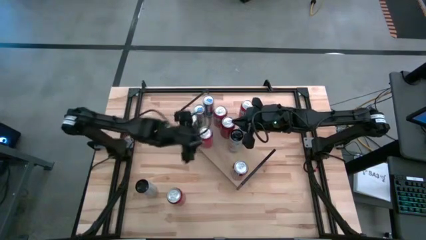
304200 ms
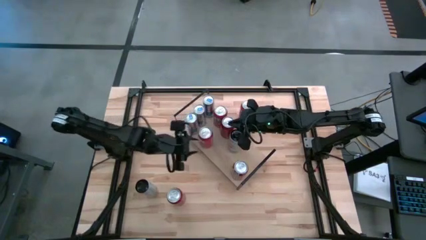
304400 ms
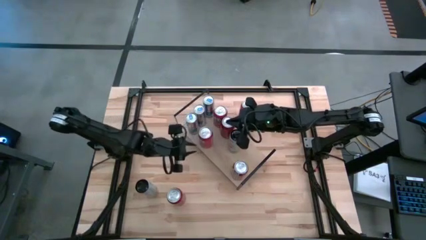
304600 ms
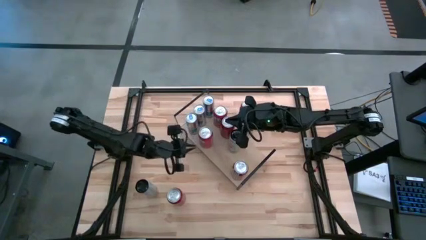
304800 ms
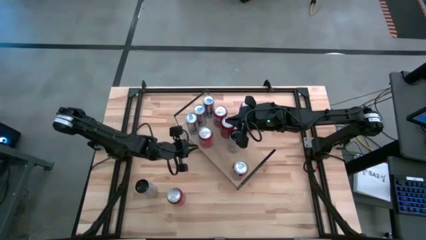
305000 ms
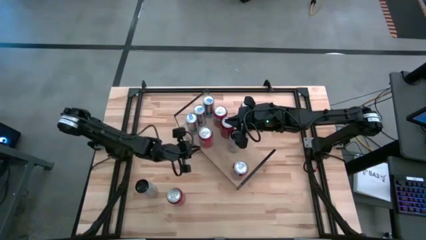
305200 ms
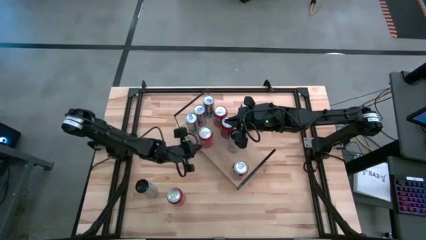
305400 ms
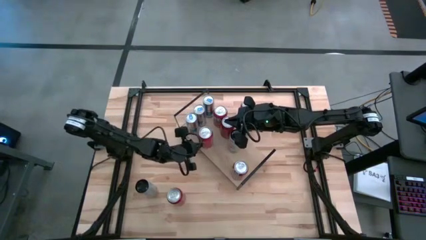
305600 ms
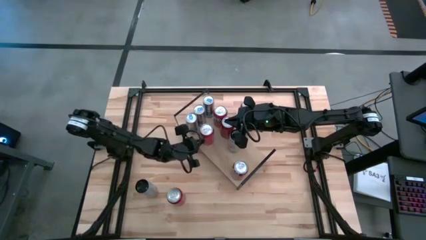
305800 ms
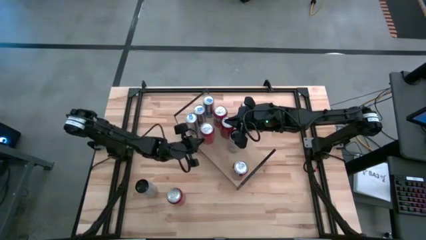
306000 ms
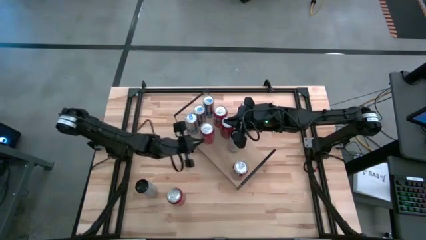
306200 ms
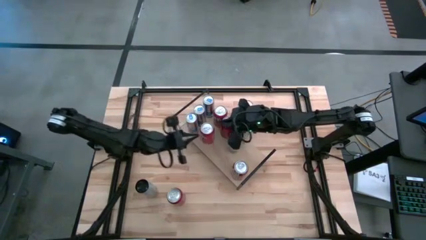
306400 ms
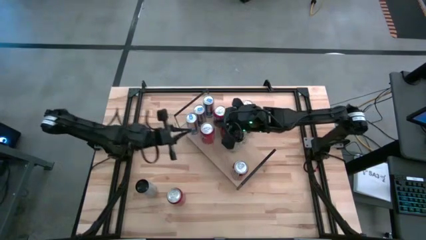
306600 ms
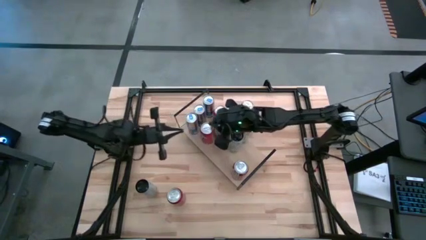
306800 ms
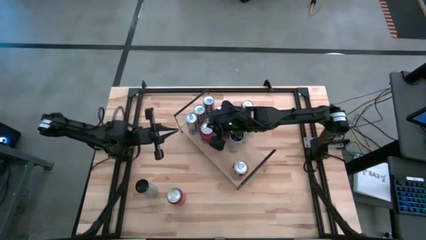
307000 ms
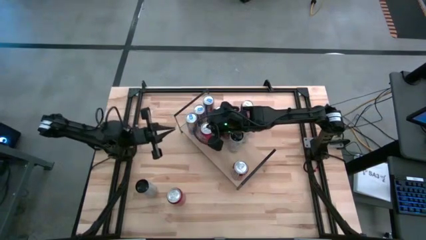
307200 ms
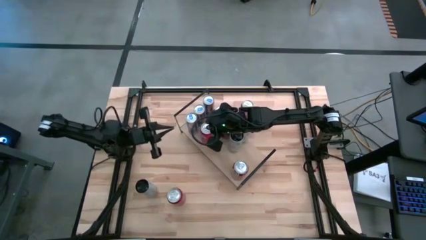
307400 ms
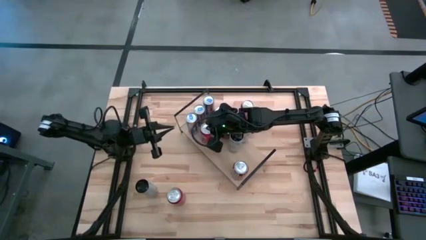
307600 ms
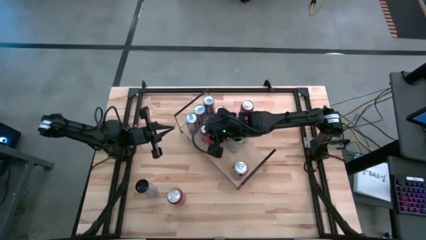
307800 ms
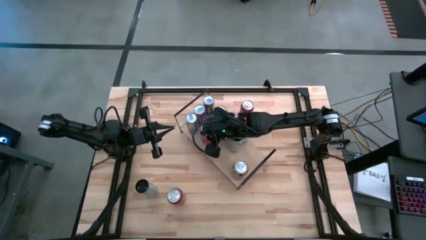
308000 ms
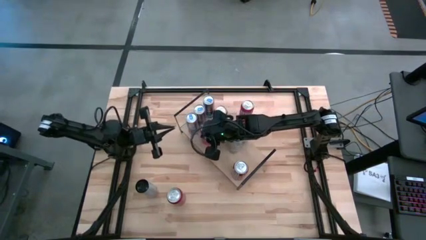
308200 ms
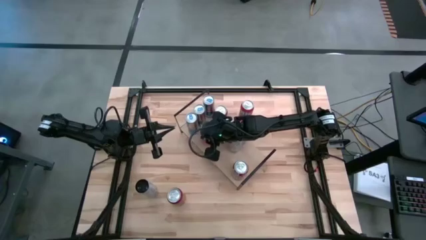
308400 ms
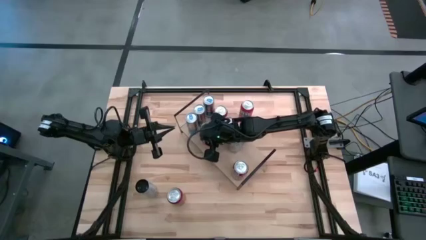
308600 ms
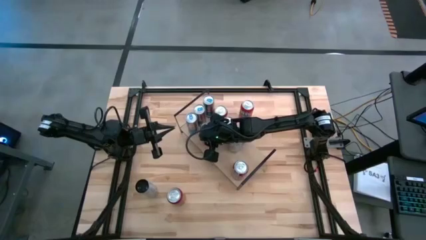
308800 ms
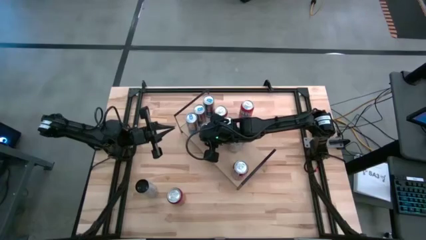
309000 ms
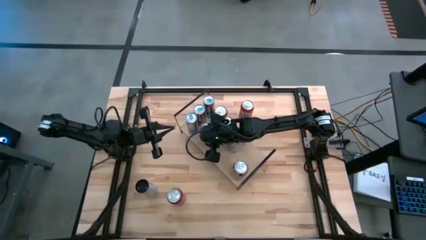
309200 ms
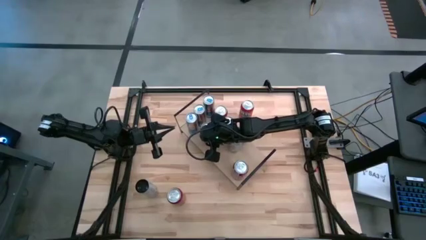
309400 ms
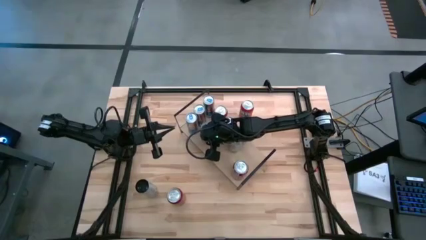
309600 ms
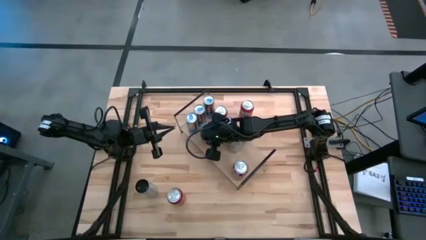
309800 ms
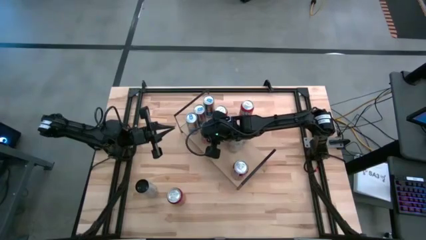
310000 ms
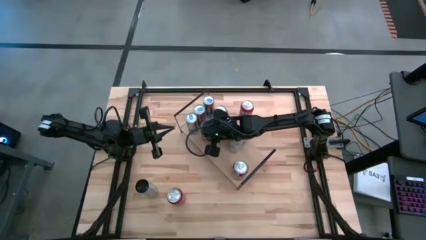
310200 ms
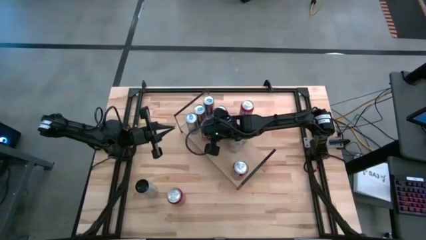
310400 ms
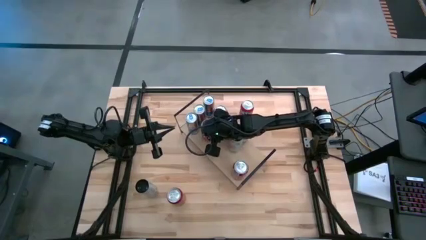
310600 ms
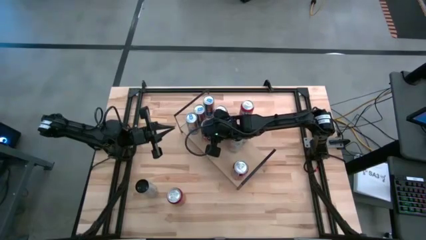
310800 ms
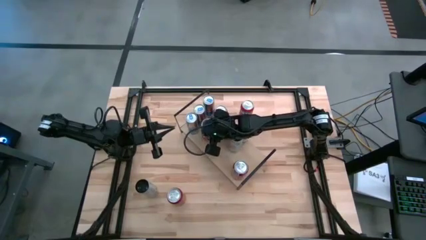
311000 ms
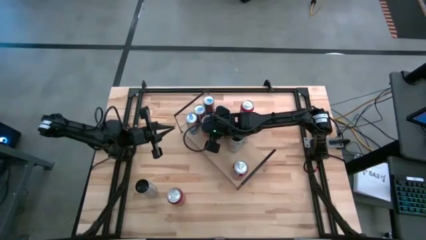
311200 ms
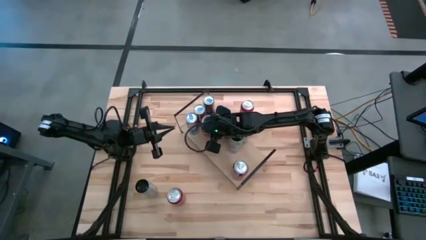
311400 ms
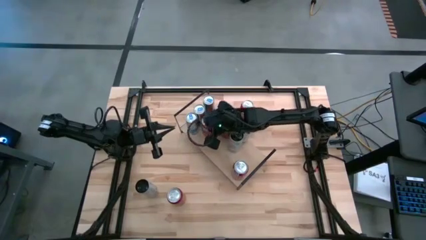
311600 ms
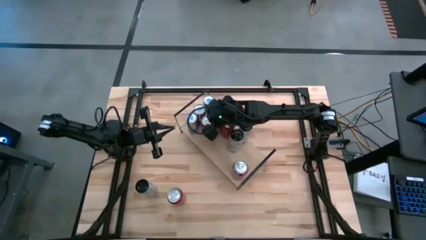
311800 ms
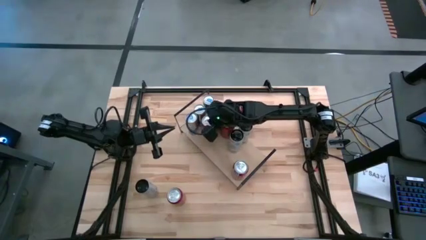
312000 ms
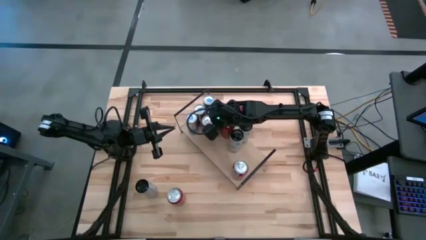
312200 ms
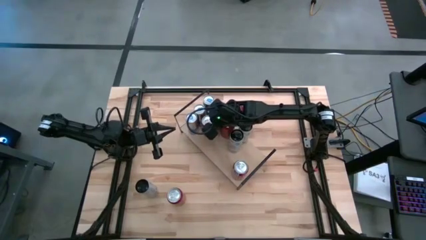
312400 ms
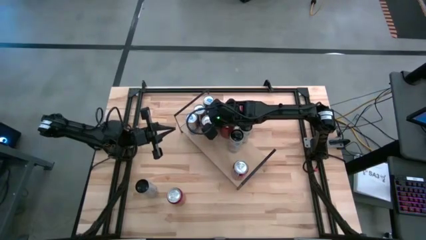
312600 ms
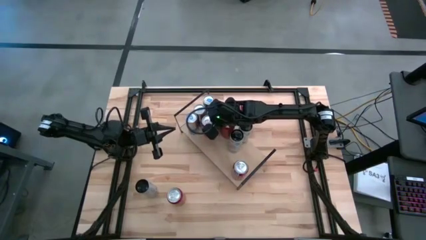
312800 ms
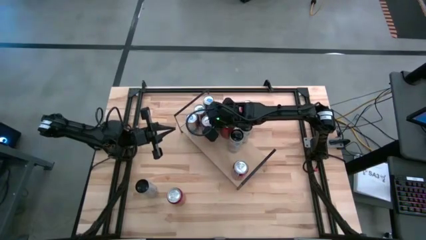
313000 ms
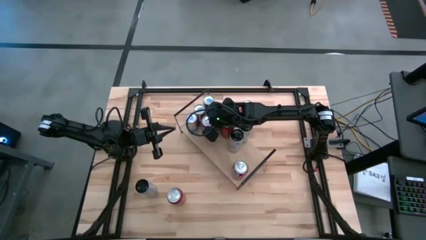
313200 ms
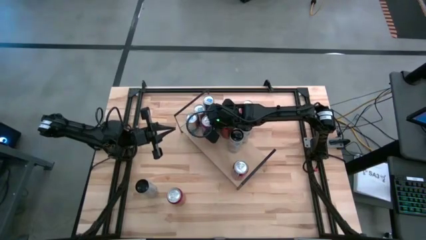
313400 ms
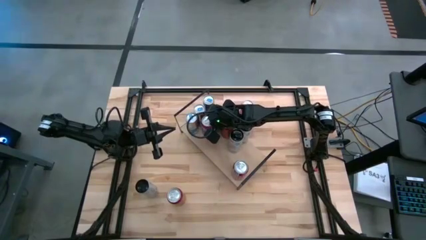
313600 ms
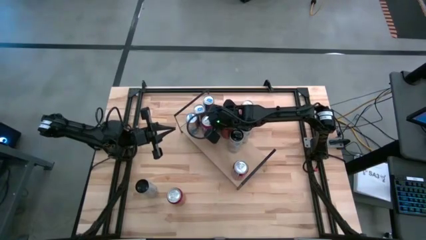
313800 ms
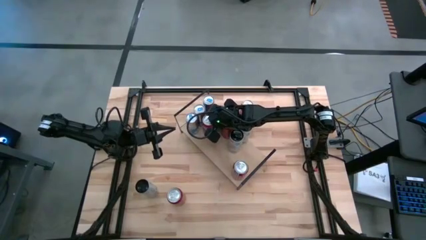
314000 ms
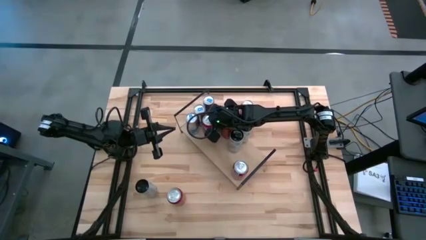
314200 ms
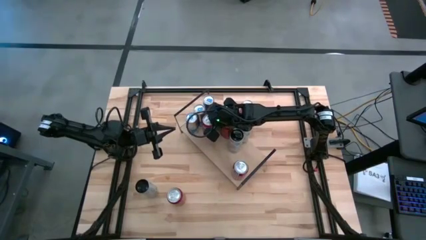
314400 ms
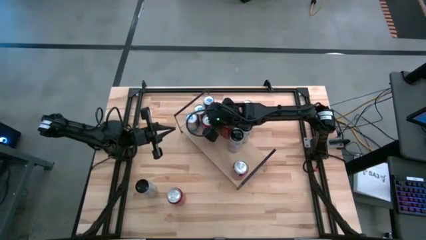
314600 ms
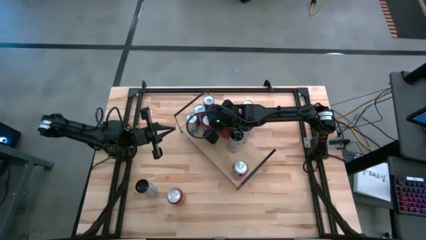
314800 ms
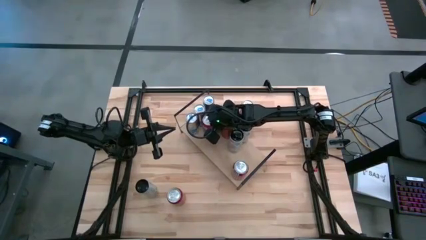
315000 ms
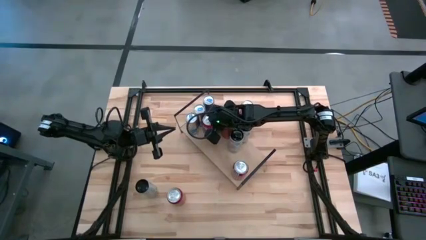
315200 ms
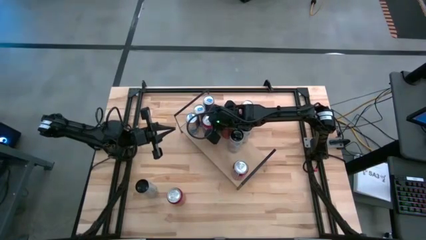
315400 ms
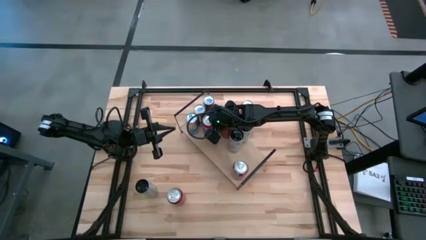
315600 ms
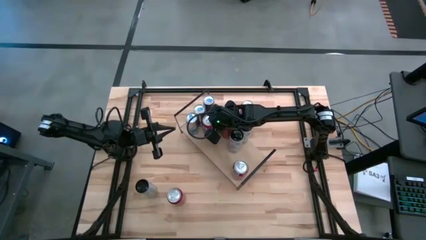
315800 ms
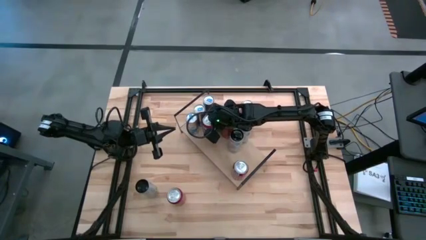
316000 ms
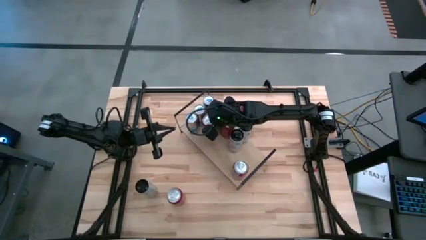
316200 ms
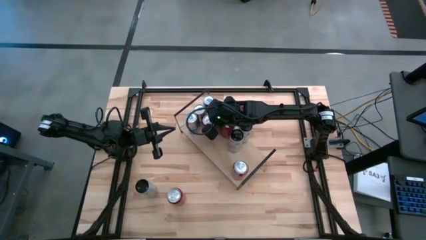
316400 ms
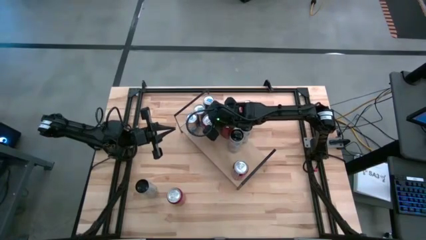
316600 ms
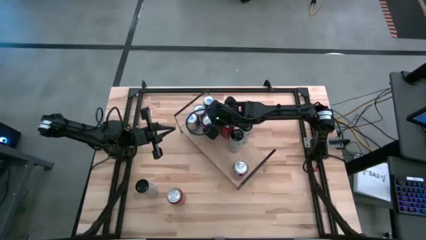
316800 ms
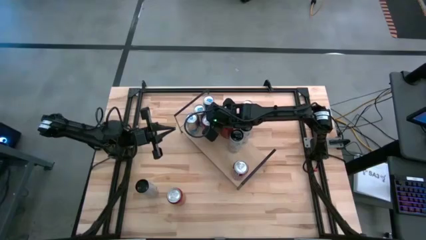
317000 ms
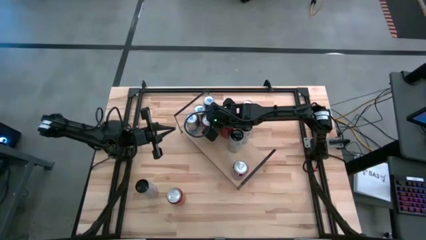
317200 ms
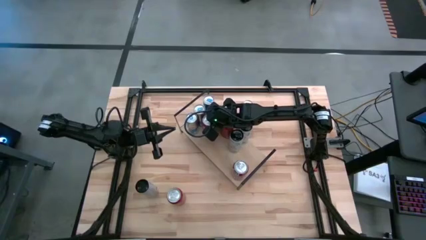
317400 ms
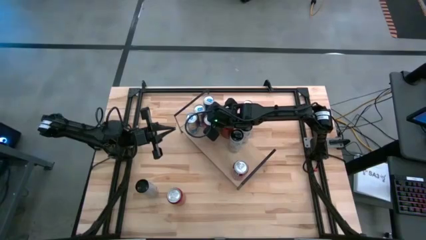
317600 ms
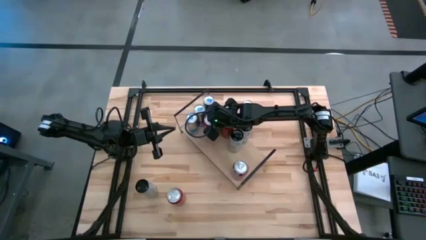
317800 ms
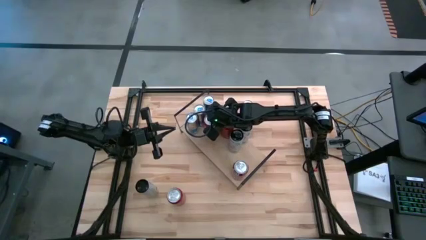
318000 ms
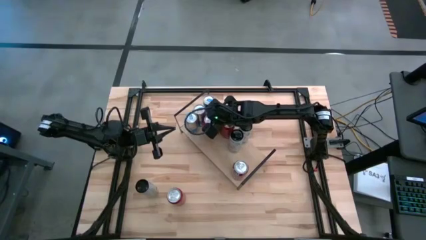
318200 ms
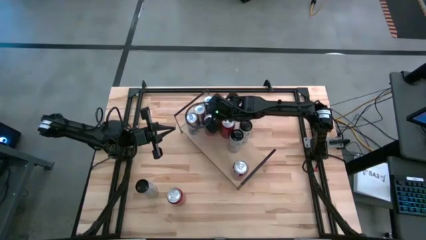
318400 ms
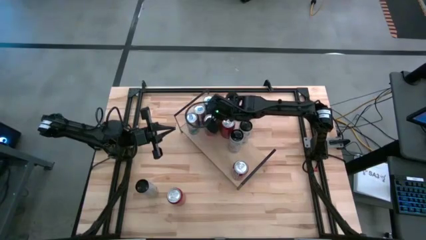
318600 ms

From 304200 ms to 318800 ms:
Task: Place canned beverage on shelf
Put the left orange soda can on the shelf aligned with the orange soda can on the shelf

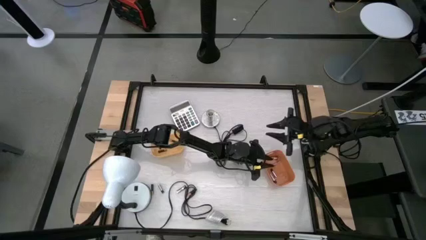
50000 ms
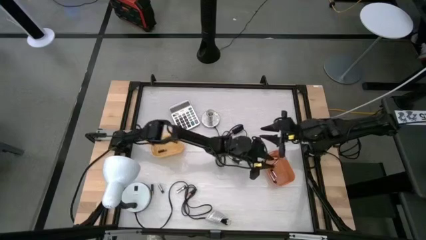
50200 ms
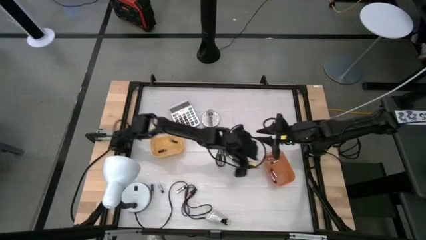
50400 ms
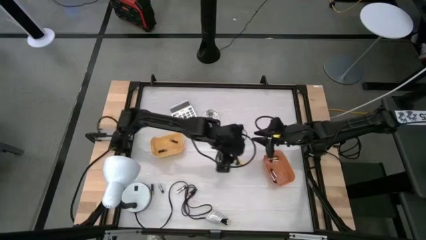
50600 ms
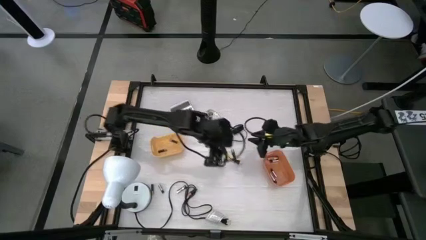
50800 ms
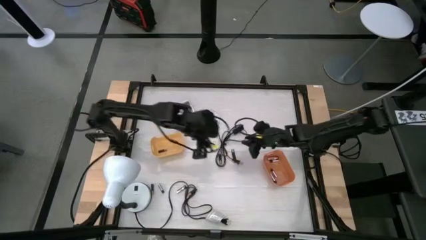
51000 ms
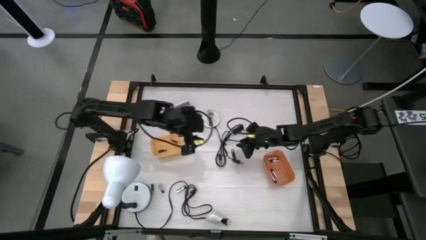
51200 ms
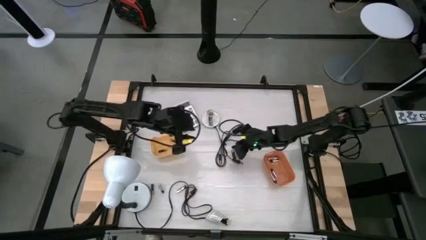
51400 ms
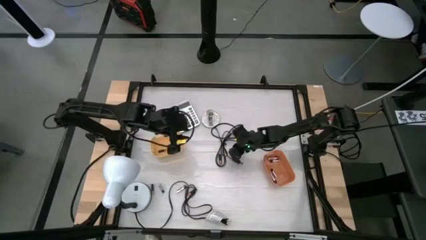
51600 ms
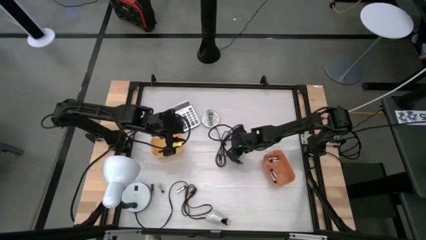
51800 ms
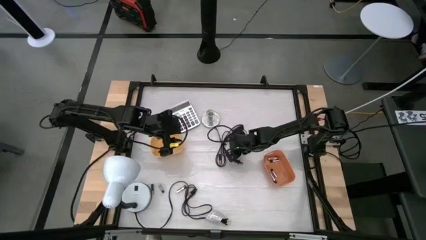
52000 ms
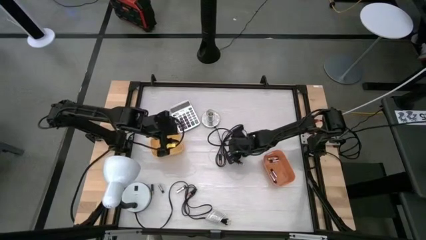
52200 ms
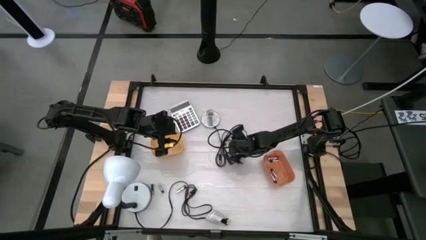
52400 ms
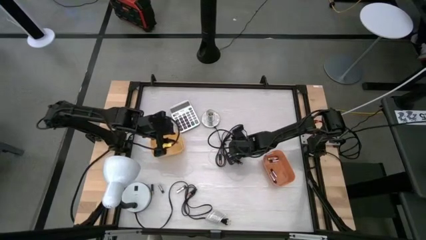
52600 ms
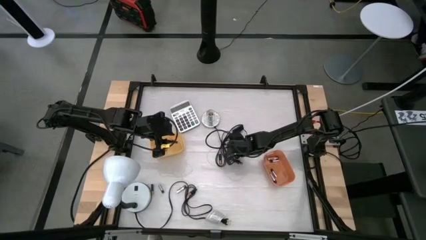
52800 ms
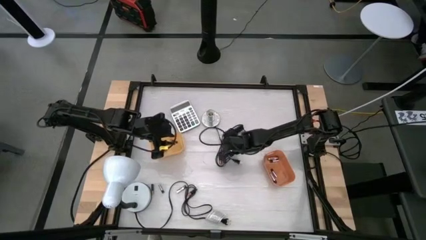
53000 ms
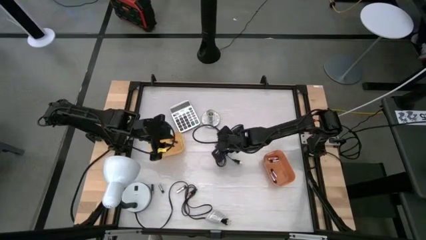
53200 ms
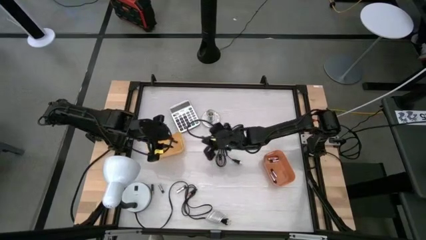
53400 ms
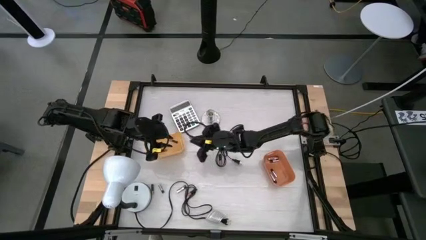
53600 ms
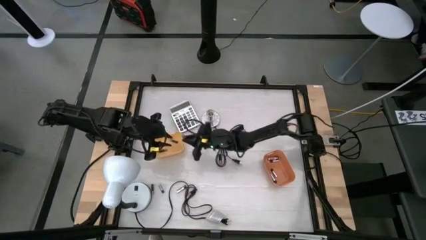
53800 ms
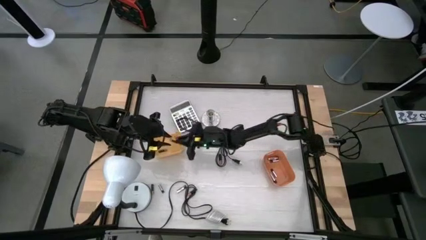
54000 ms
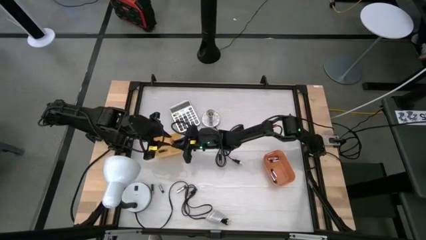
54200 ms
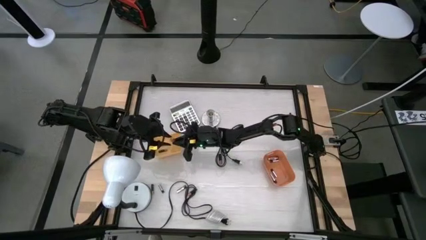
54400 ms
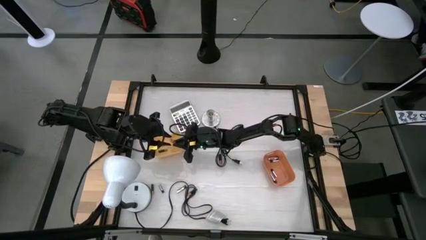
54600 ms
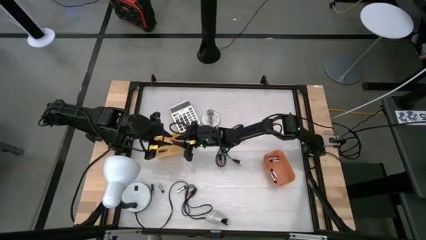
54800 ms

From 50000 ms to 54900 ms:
Task: Sort batteries
Put the black battery into the yellow bin
